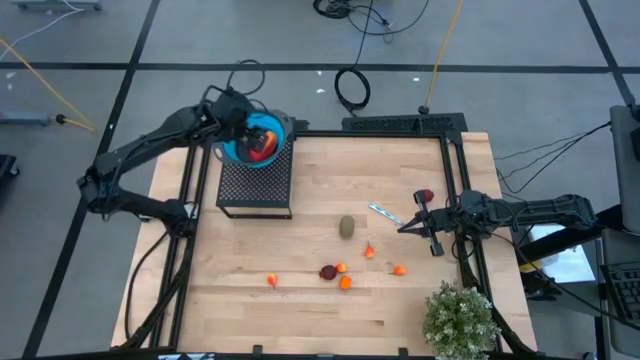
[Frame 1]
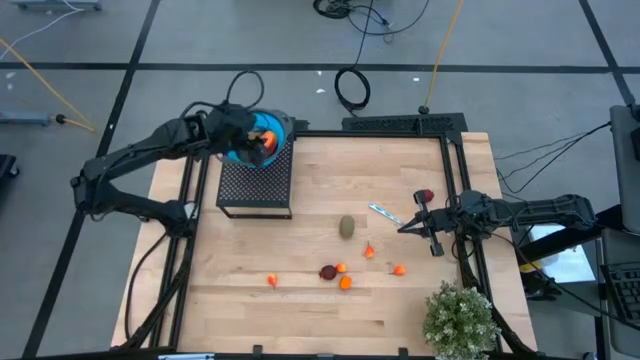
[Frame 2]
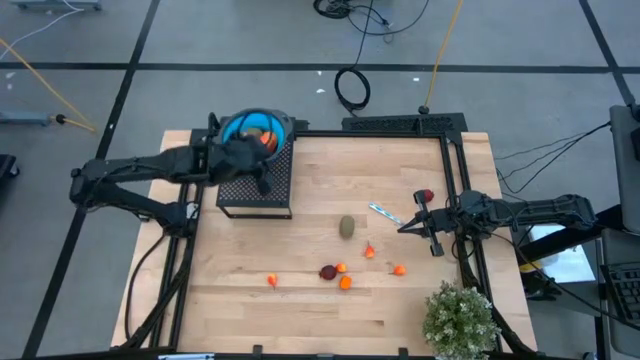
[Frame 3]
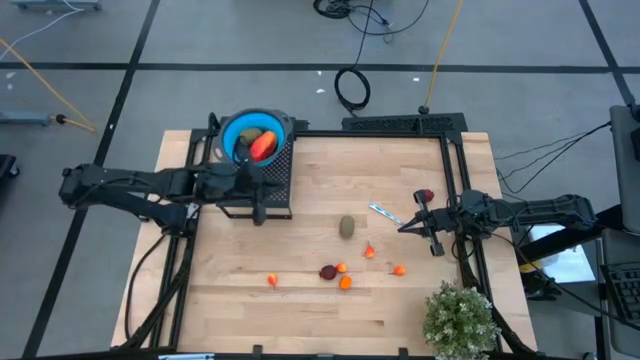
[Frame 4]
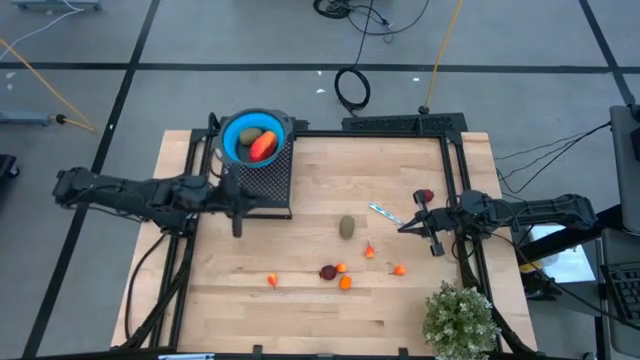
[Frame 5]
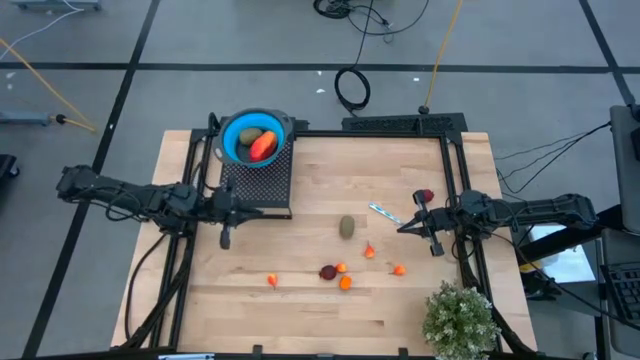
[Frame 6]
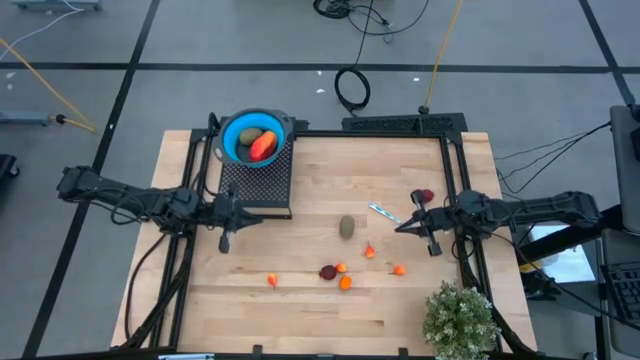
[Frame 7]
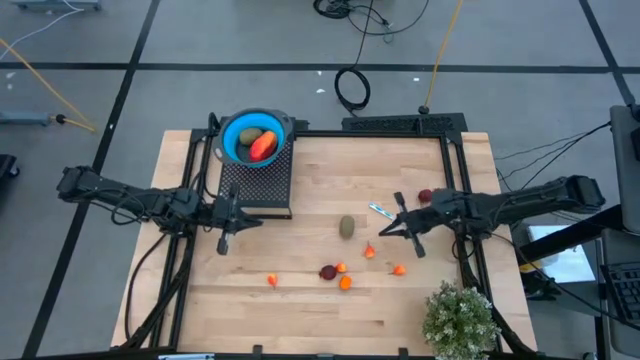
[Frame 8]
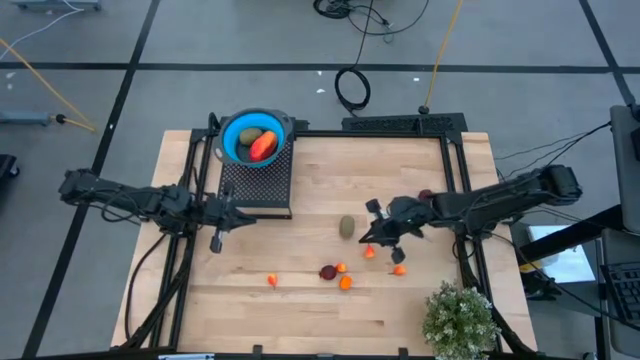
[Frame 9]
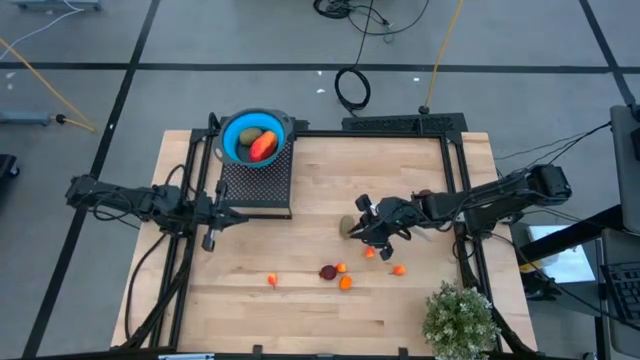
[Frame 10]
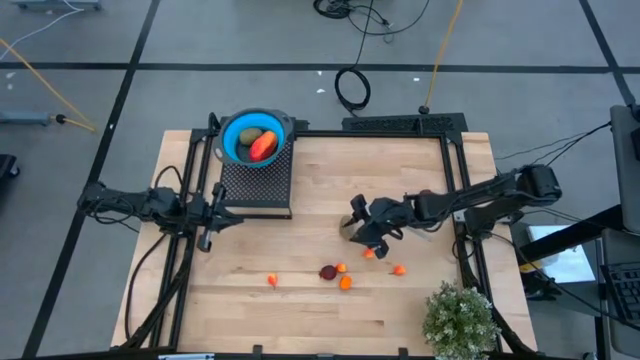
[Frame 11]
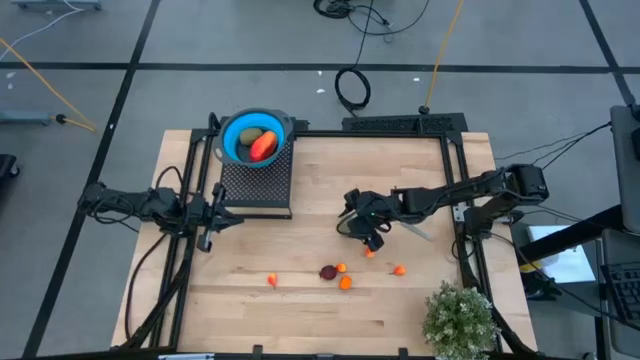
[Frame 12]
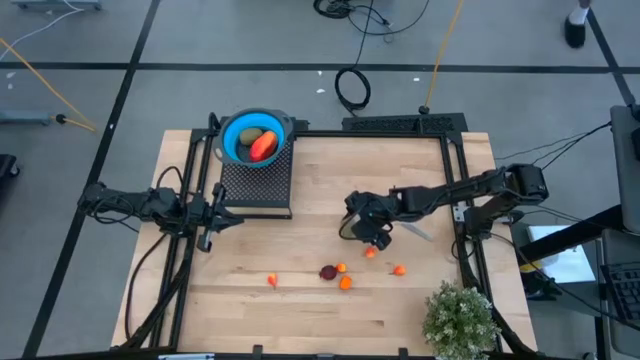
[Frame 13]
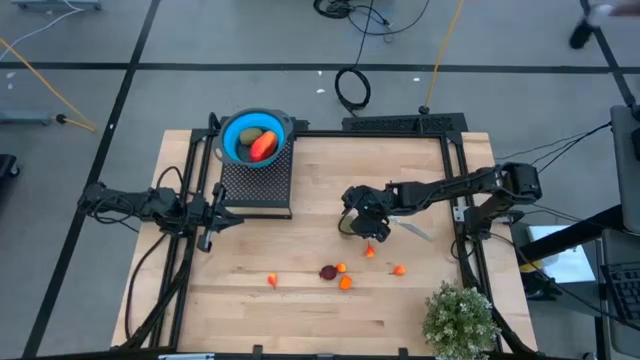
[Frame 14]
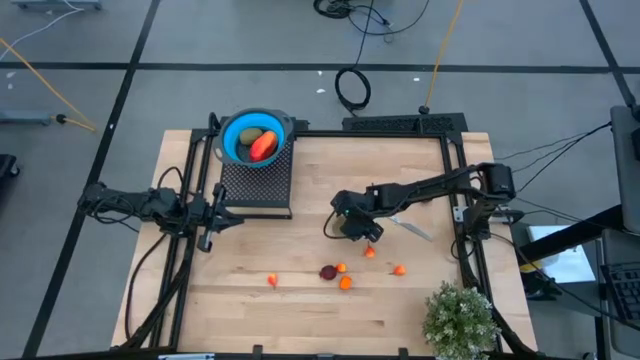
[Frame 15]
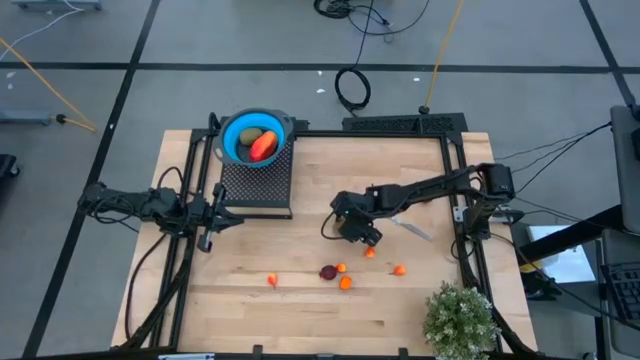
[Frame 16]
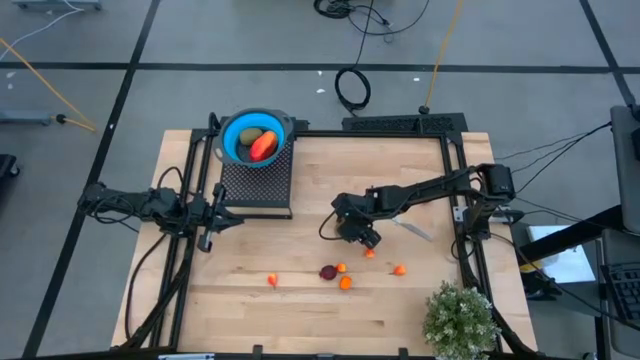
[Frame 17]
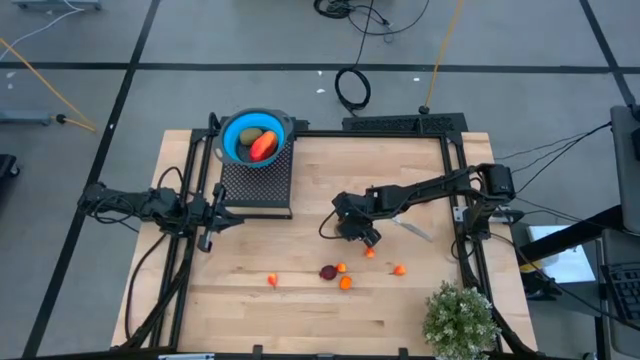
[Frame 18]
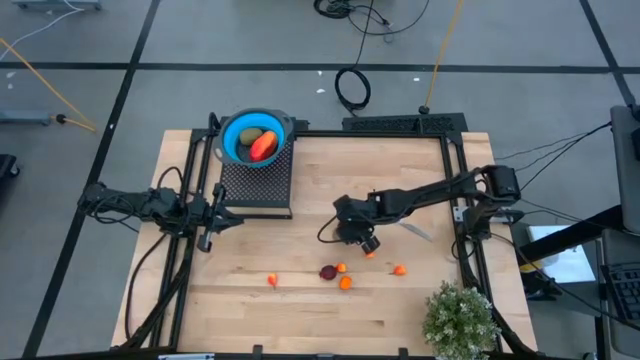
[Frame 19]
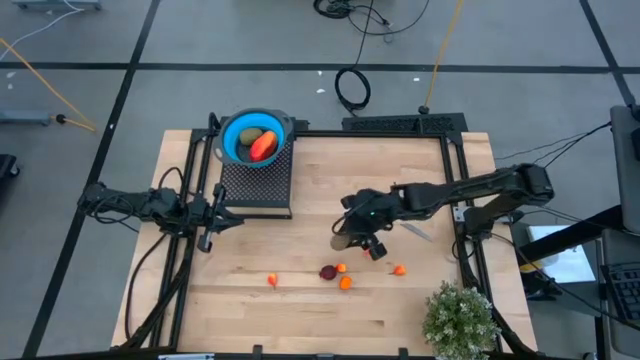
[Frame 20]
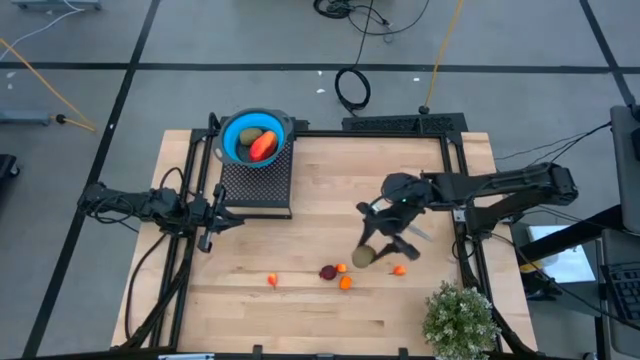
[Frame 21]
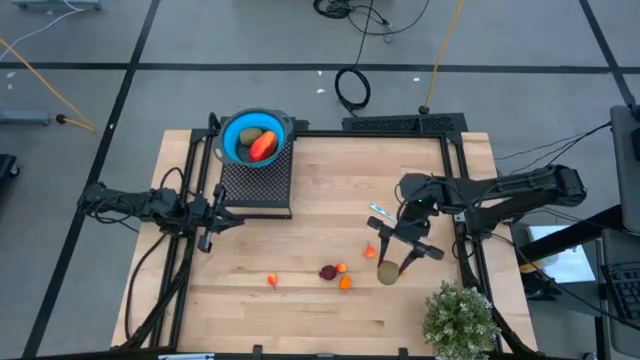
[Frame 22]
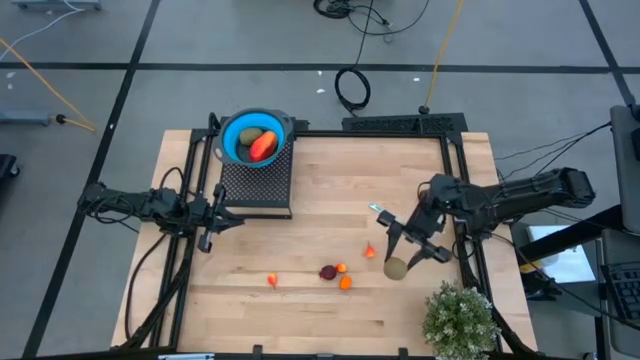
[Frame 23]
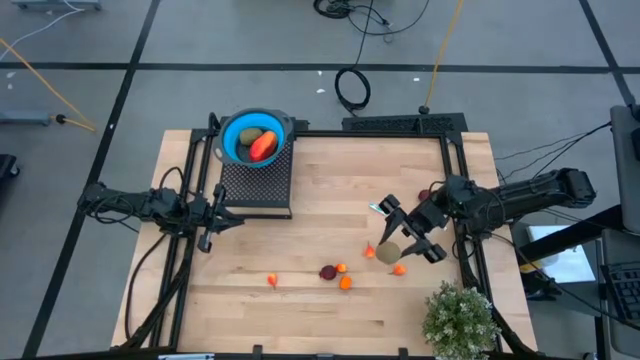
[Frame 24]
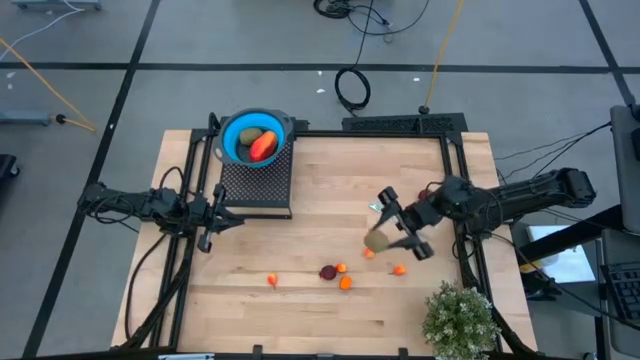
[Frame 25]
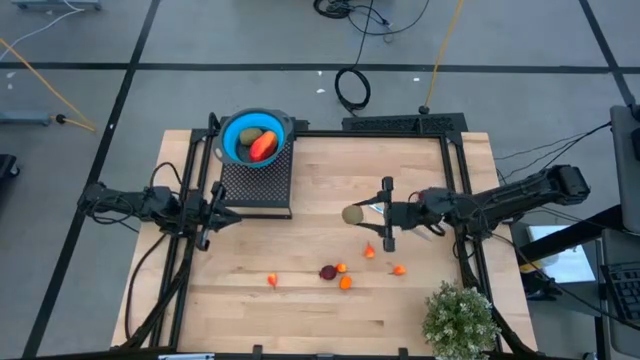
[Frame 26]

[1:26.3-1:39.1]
Task: Pick & Place Fruit
Put the brown kiwi into the blue strainer bowl on the shelf

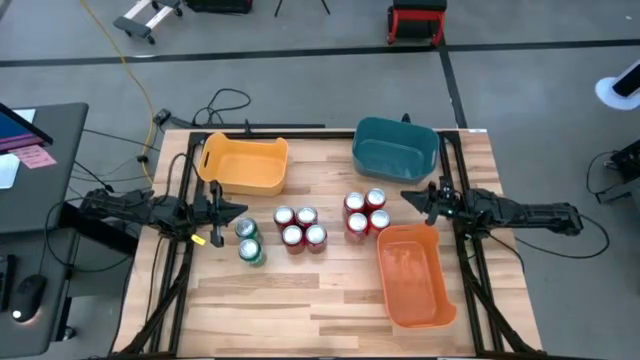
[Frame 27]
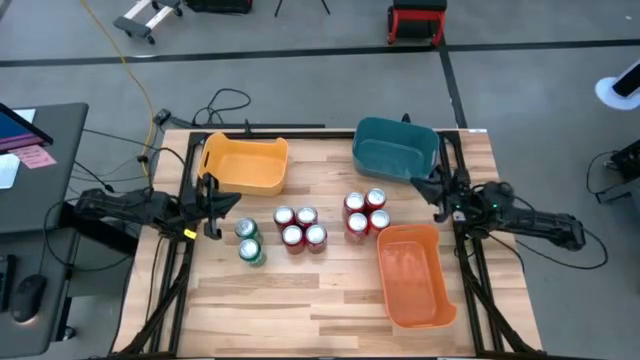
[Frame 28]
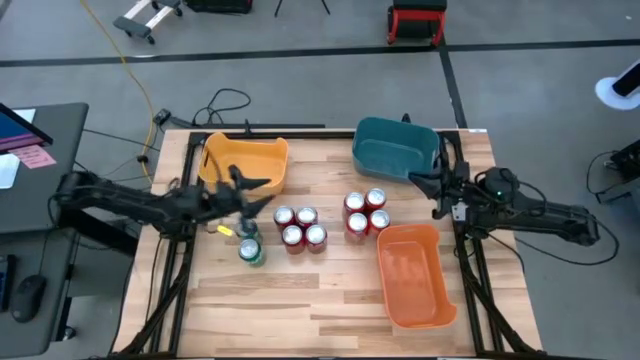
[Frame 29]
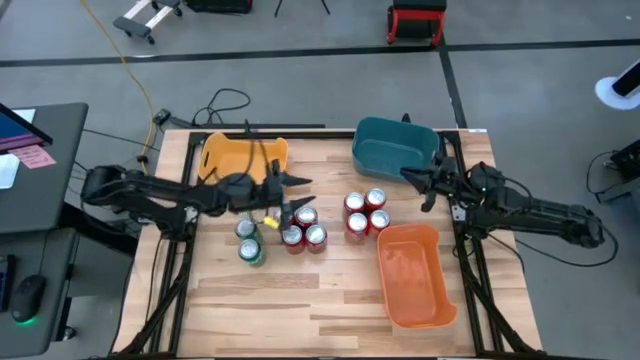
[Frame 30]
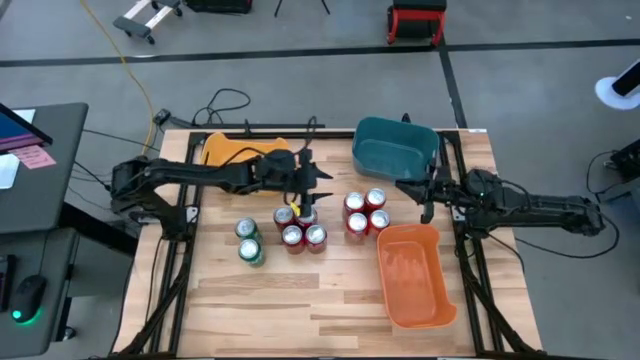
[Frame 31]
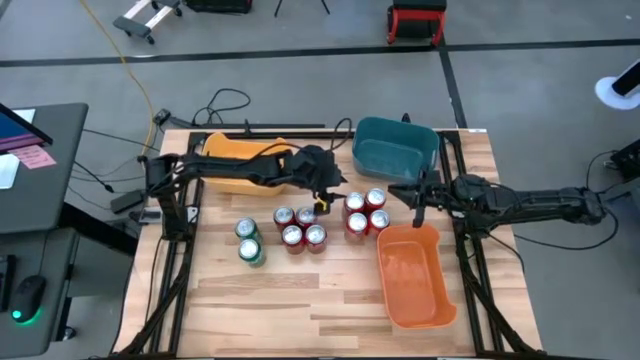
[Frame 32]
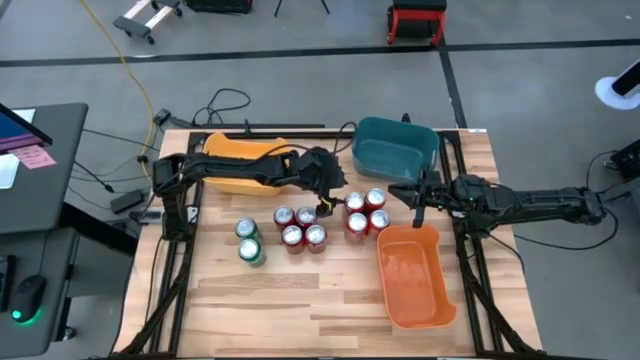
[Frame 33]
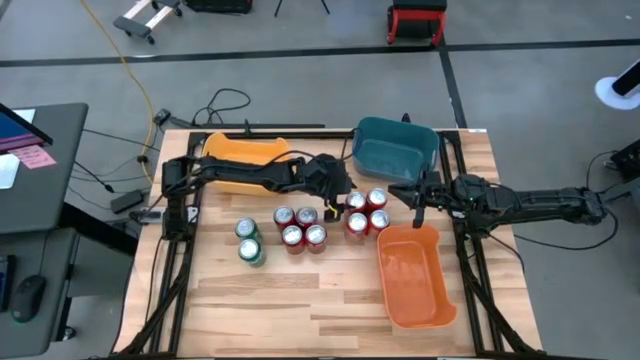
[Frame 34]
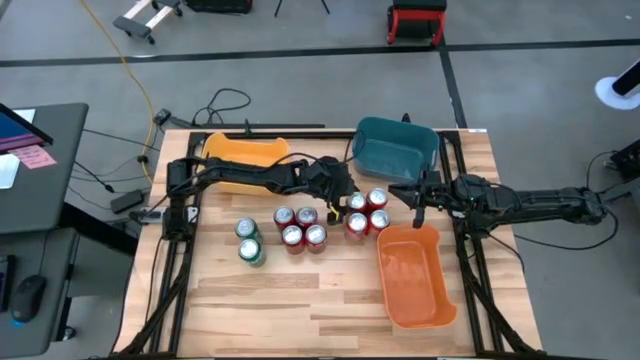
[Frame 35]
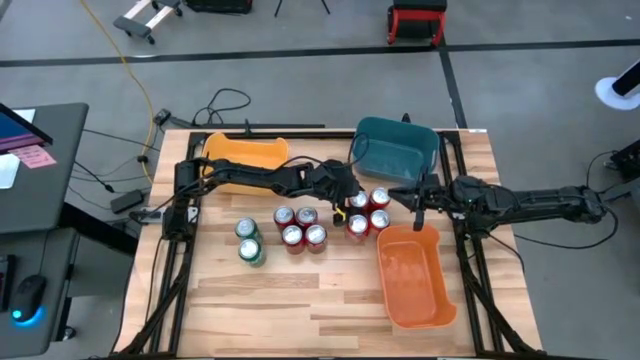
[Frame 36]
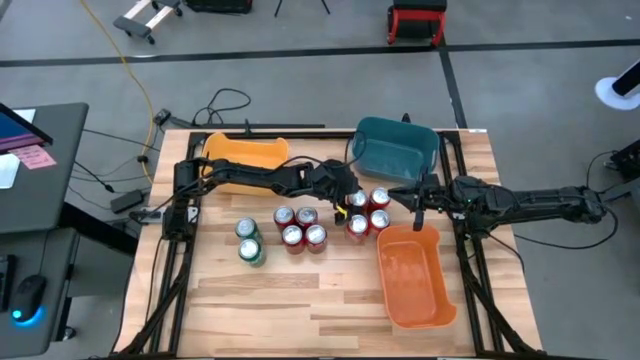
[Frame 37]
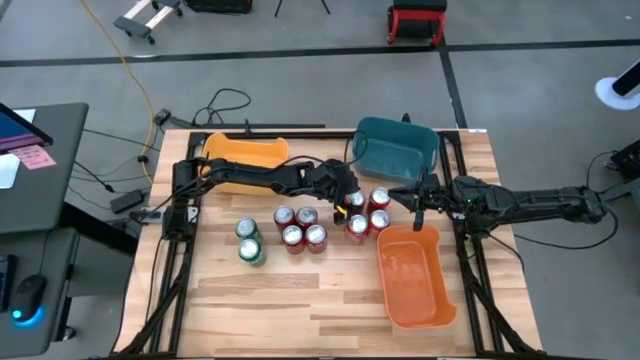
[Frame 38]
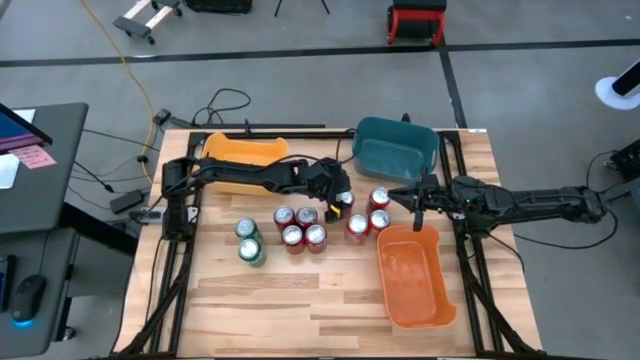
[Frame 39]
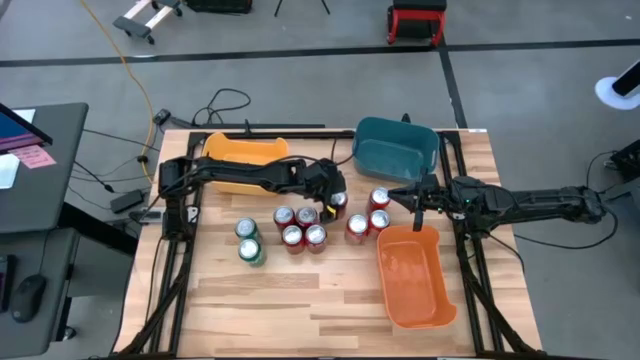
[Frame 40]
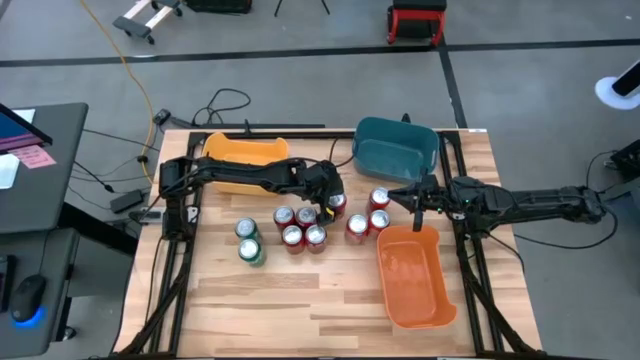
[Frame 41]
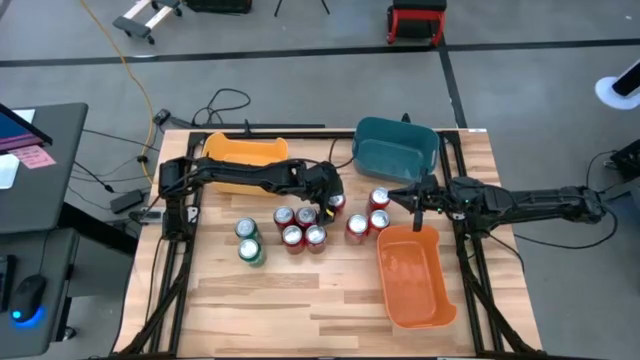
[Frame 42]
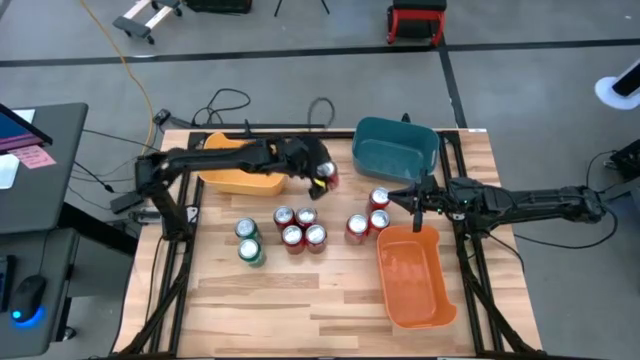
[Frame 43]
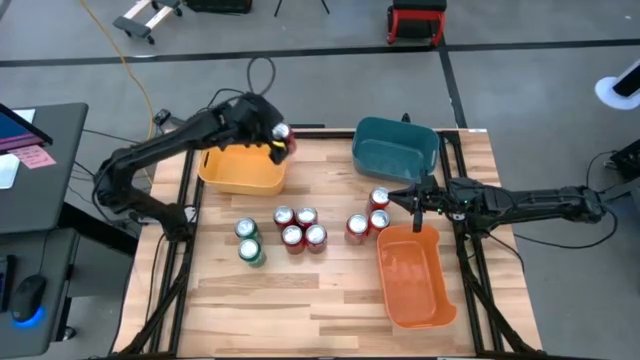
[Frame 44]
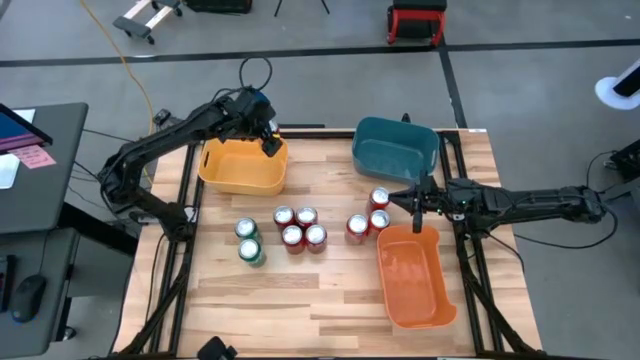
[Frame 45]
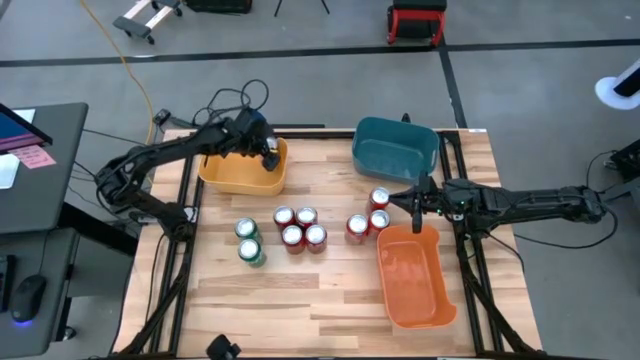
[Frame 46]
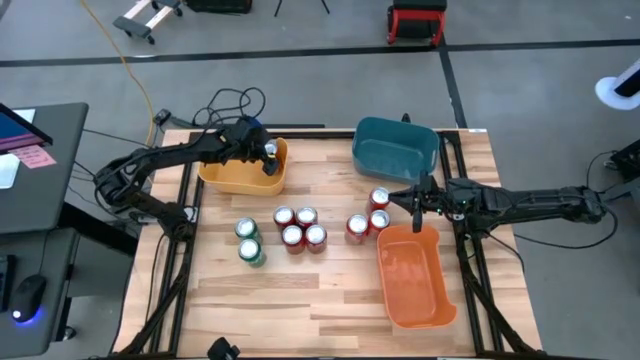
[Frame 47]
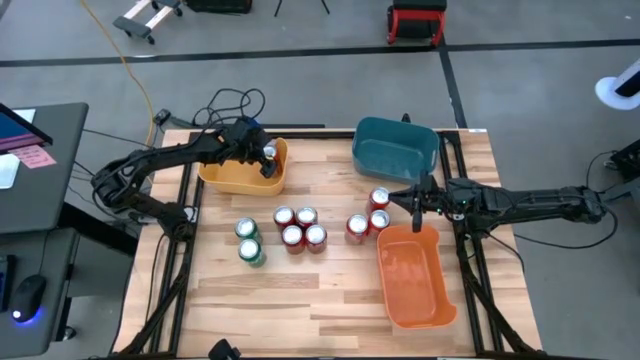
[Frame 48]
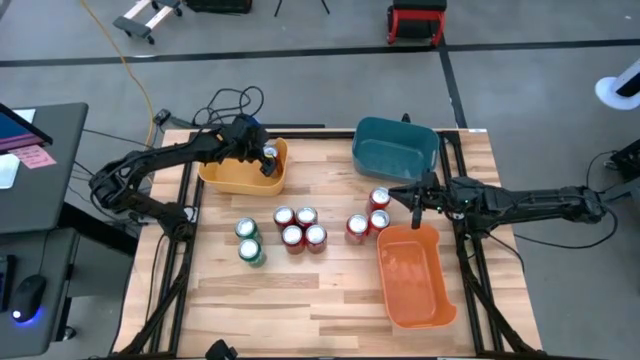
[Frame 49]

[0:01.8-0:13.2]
Task: Sort soda cans
Put the top left orange soda can into the yellow bin
